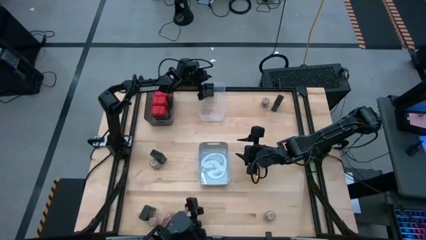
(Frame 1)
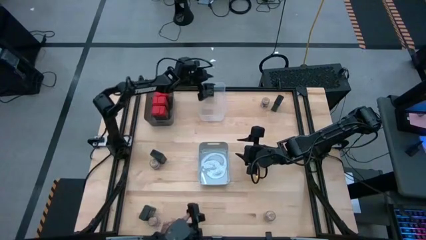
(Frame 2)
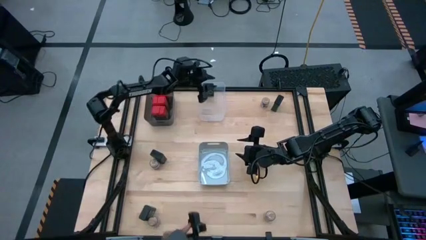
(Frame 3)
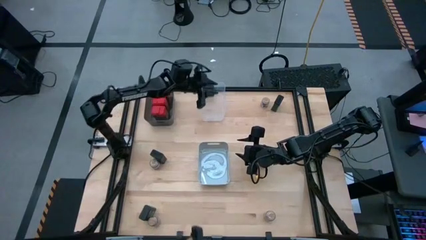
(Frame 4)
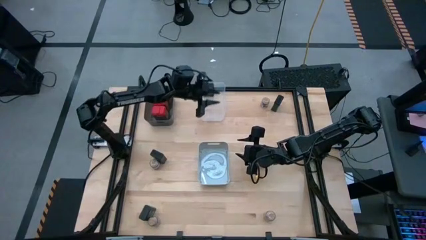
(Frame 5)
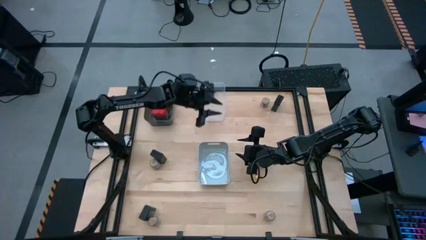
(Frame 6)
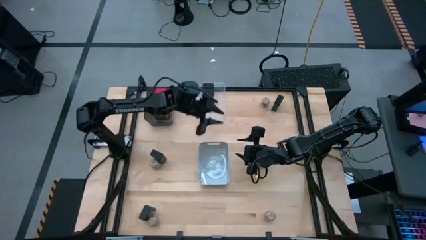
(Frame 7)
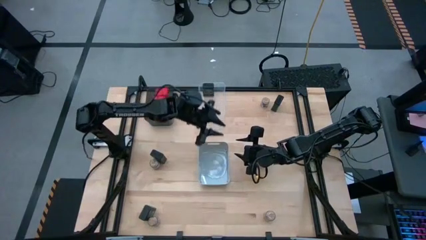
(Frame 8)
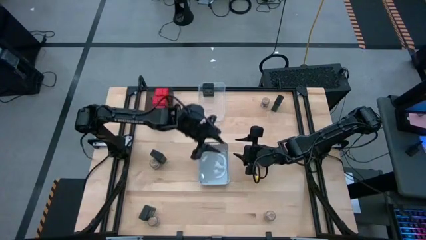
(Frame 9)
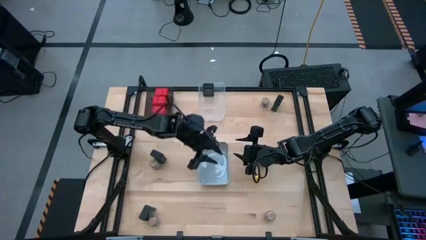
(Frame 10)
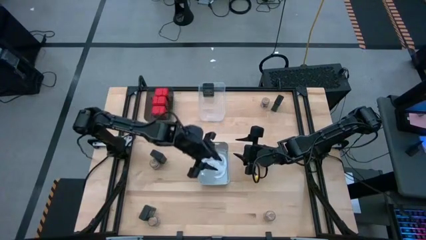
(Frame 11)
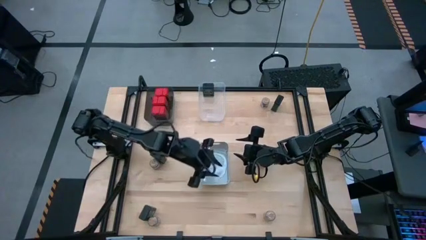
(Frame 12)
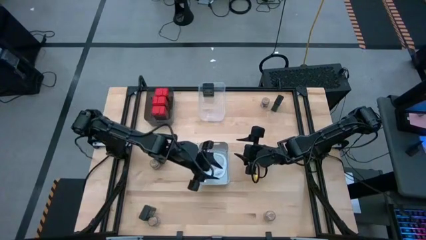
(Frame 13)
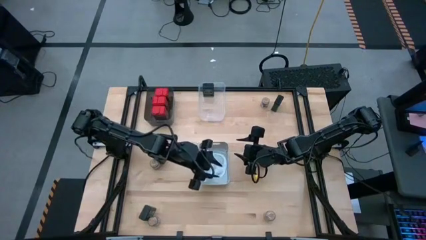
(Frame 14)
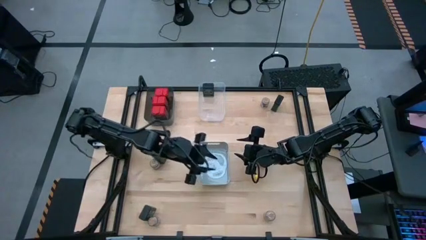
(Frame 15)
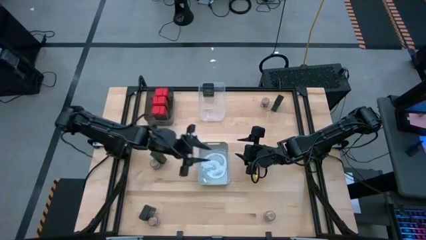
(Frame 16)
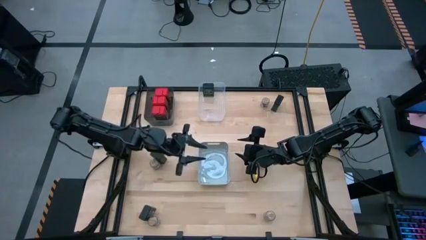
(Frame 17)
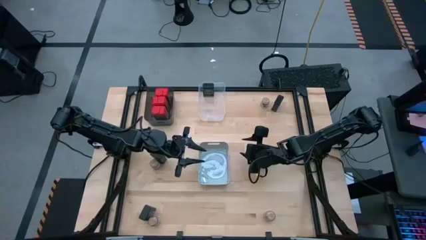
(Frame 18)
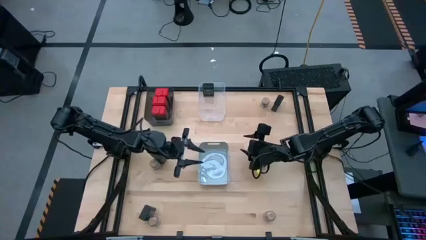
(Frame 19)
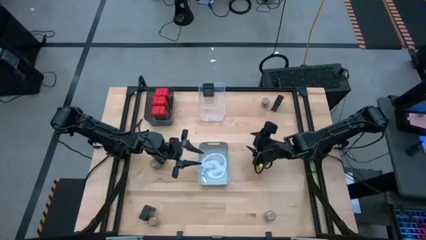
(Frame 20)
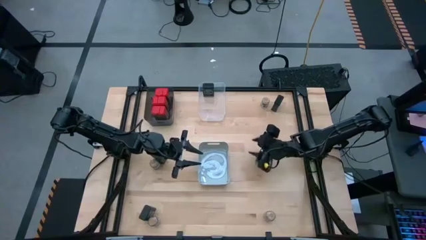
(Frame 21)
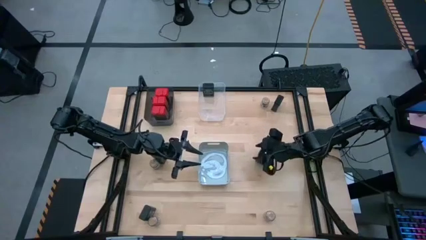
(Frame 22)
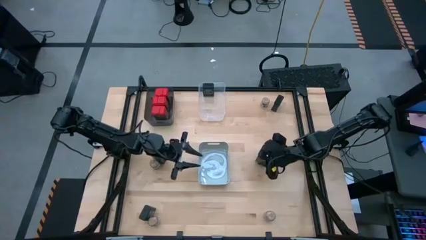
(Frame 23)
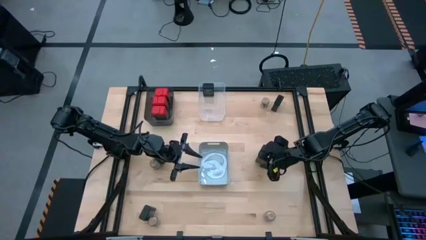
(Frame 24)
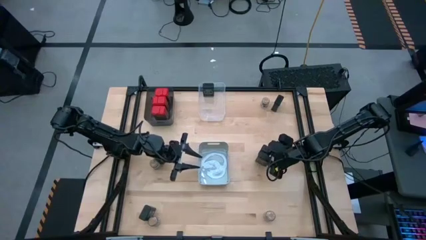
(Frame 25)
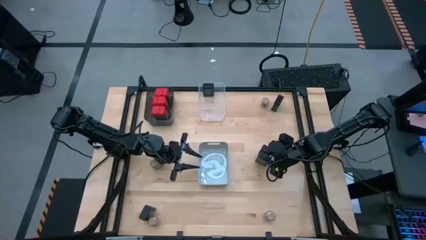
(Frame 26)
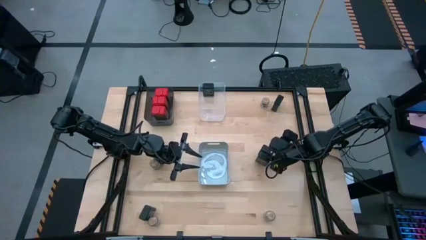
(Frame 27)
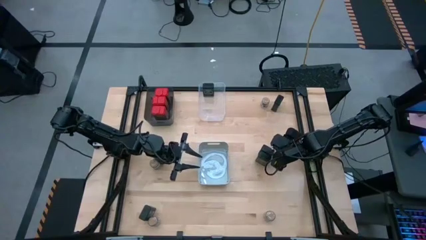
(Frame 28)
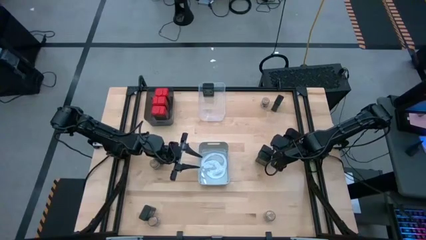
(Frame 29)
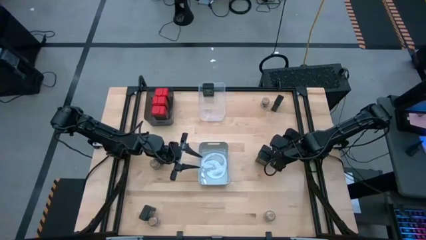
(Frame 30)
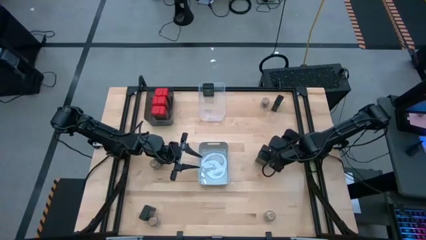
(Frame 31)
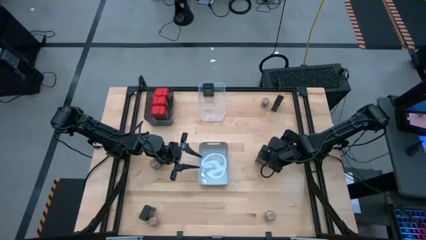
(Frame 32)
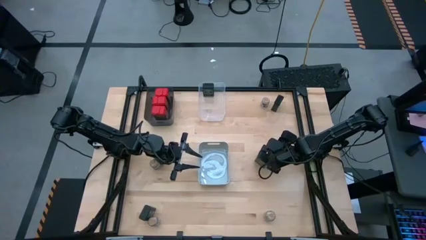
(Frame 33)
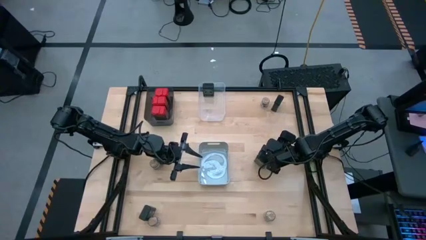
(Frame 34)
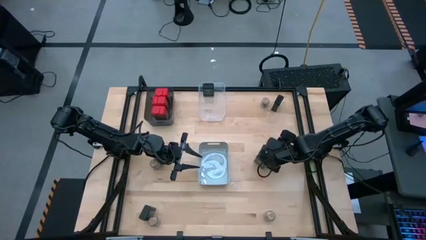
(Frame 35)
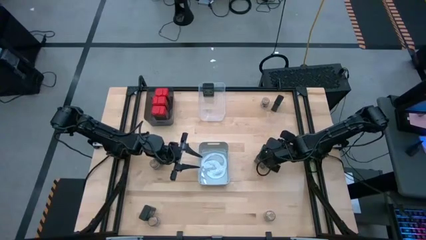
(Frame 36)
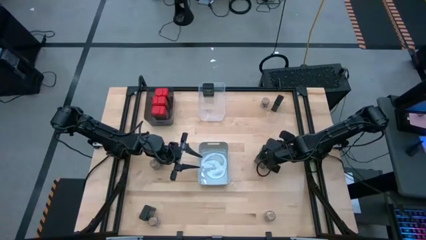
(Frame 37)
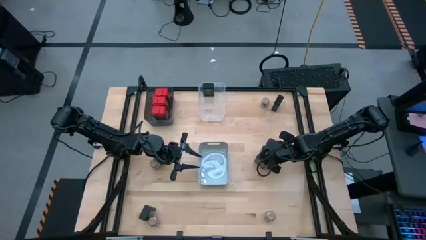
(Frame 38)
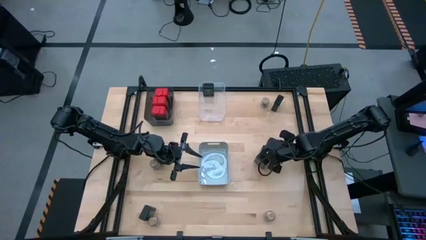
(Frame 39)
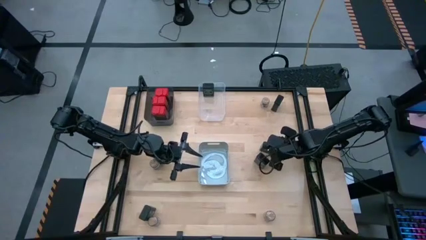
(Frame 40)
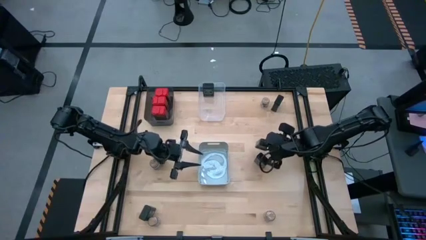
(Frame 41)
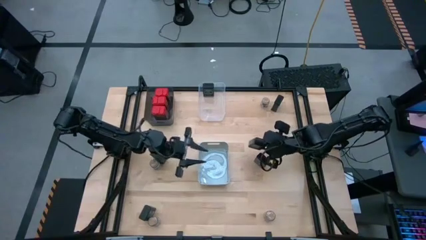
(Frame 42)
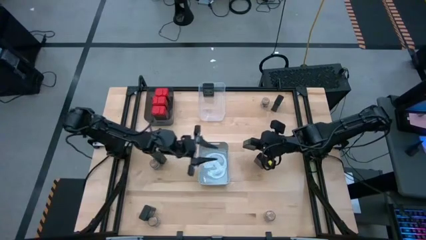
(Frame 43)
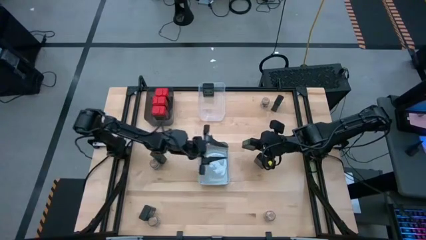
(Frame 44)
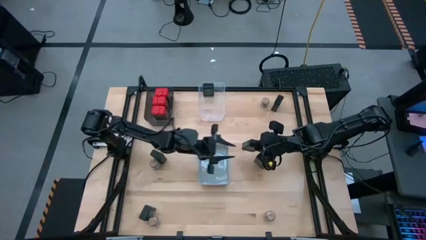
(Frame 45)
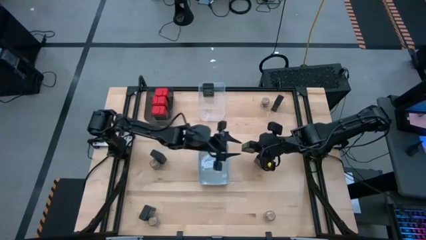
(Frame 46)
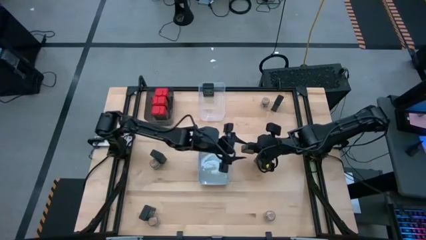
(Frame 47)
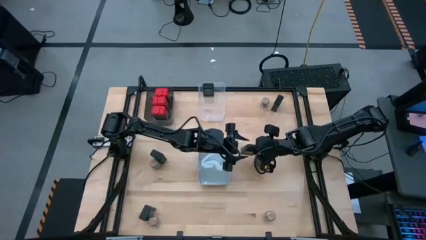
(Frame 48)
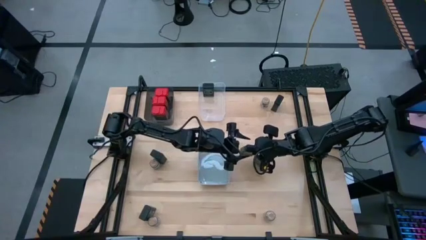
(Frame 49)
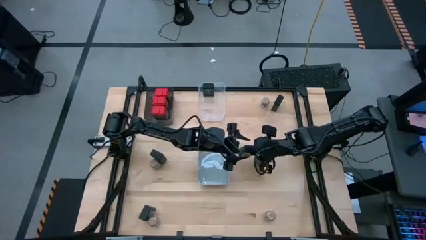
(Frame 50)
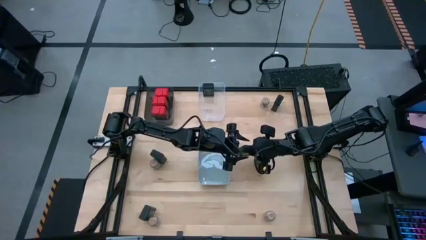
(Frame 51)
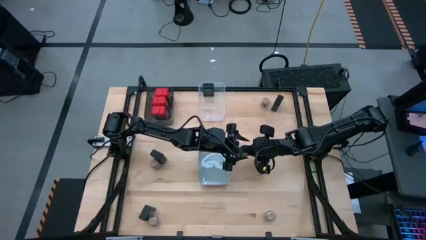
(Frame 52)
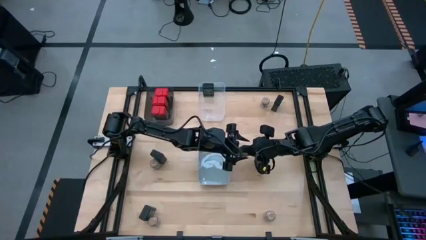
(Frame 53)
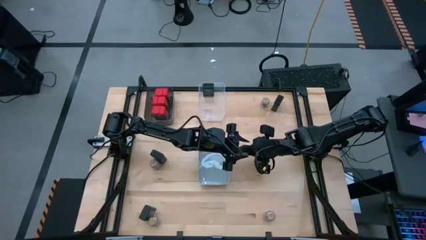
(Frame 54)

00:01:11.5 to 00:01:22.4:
Task: Sort spices by type
Put the black seasoning can into the transparent bin

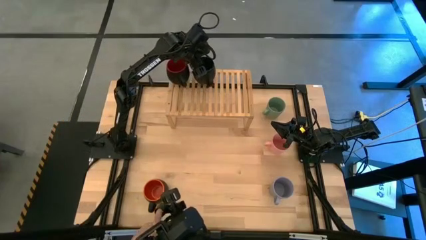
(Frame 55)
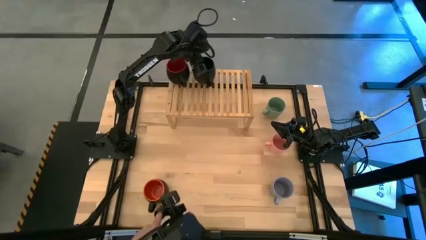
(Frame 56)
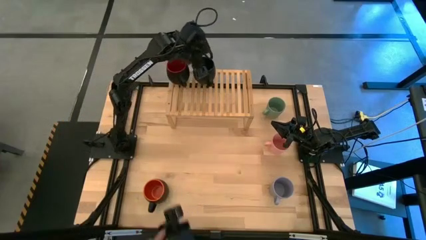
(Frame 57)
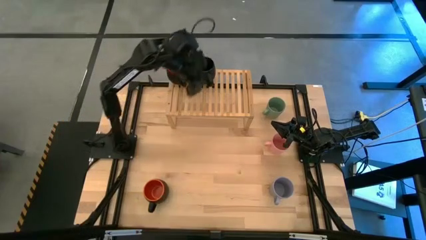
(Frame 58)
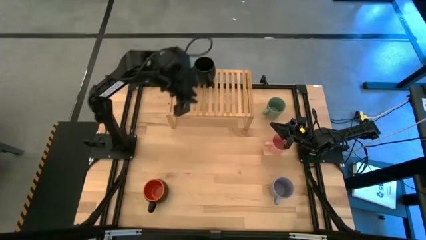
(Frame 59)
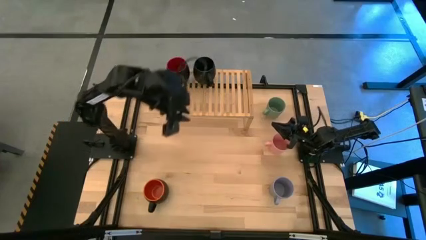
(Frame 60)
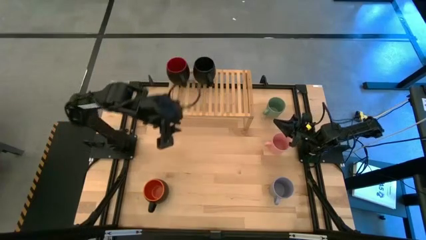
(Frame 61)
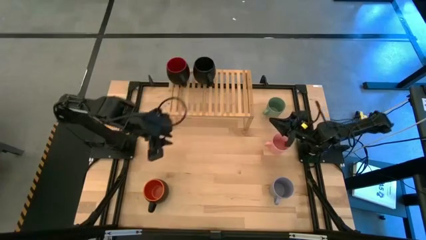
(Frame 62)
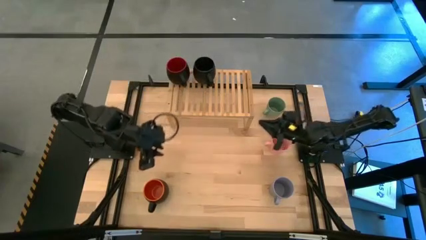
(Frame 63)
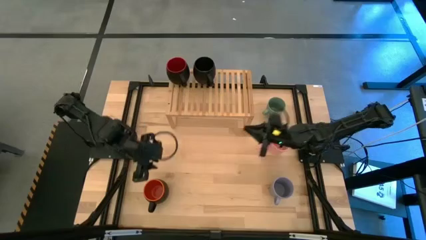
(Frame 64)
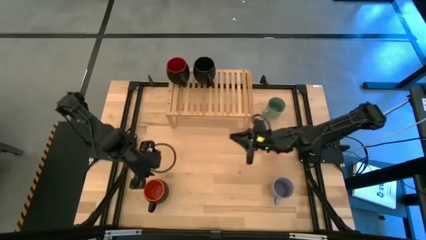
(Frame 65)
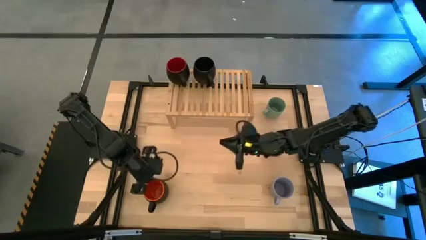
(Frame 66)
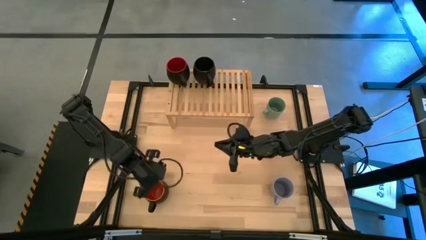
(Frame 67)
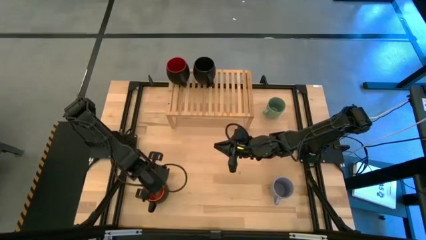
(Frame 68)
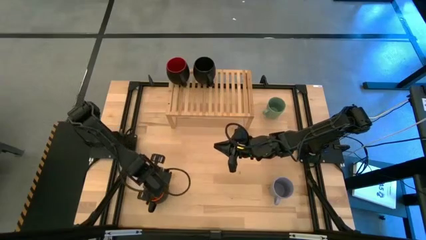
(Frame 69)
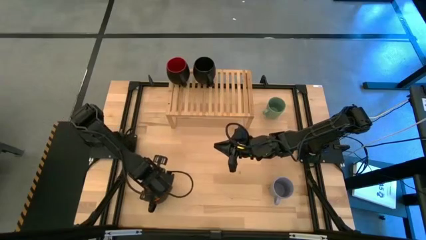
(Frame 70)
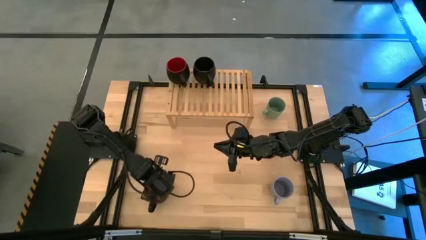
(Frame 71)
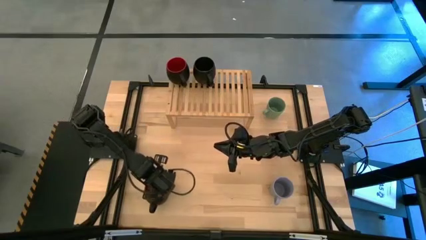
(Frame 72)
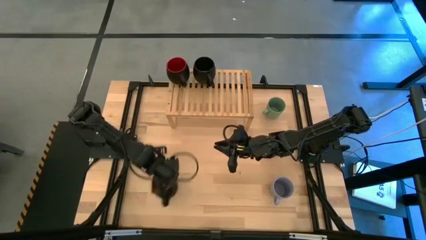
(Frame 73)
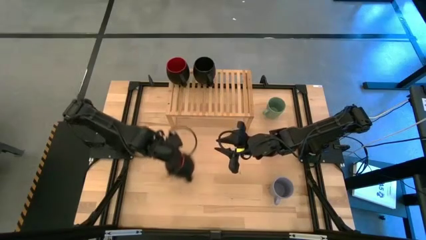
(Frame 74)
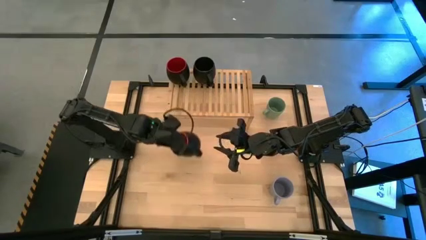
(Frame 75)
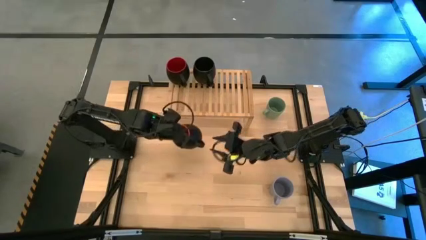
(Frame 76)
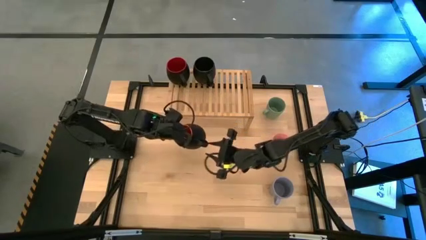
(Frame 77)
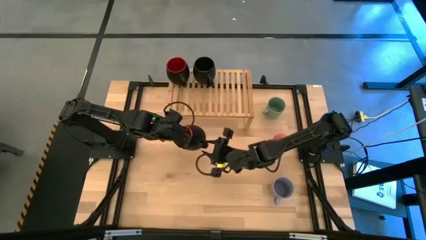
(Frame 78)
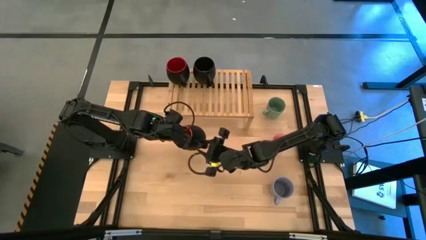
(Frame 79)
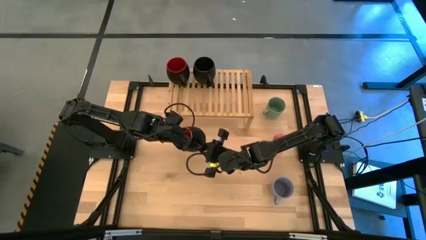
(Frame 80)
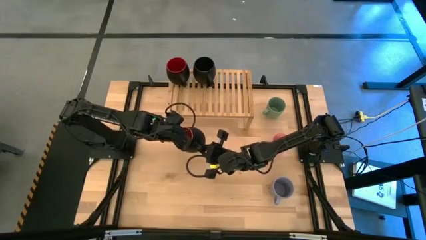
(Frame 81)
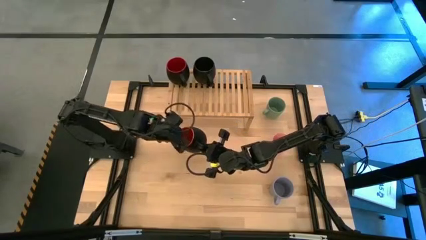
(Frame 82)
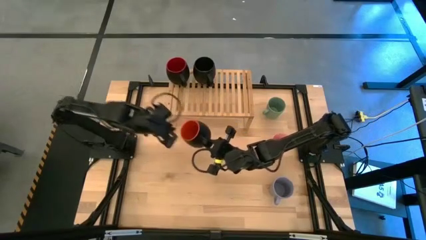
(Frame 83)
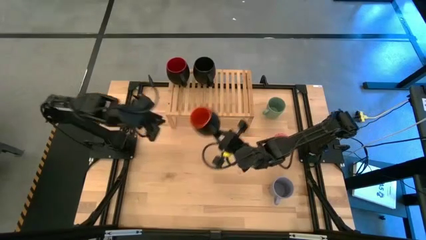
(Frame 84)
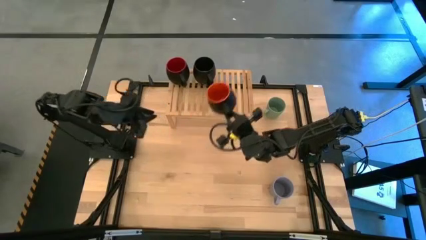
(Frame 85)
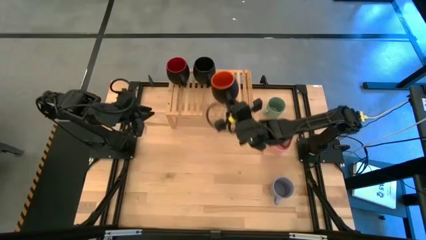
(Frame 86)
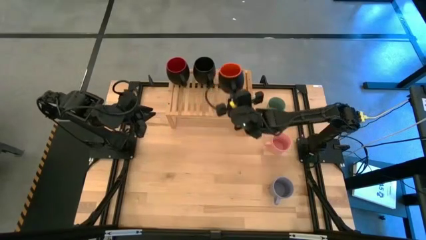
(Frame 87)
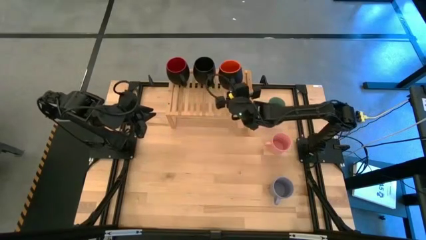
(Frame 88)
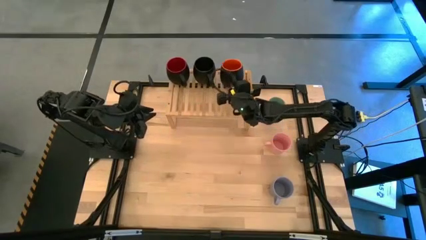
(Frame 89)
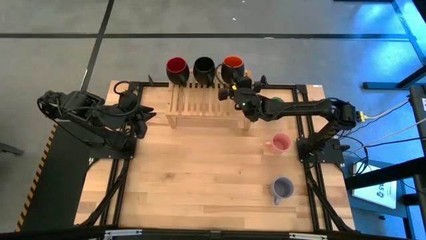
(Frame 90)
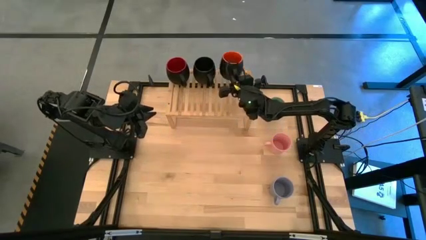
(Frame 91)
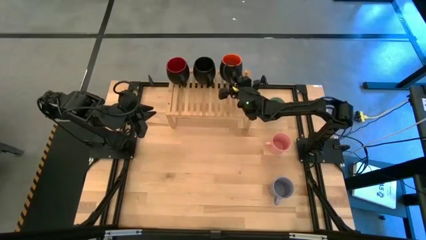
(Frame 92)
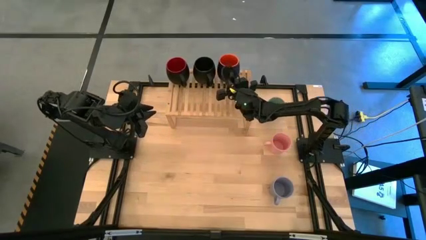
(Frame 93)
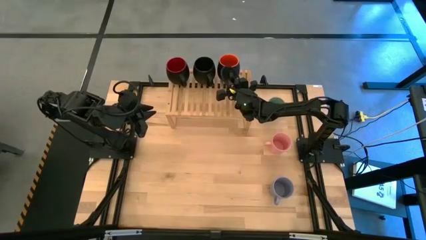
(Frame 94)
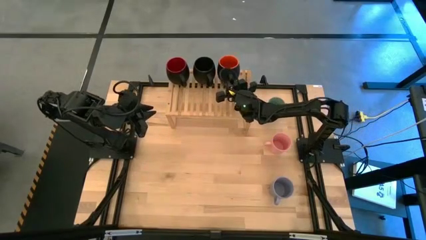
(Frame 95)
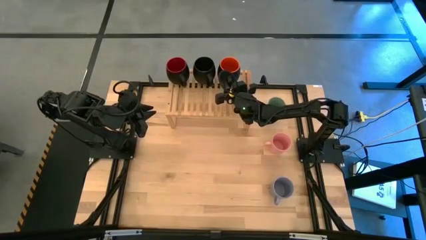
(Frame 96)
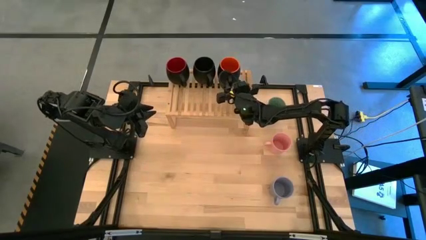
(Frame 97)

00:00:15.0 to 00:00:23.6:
Task: Place coffee mugs
Put the orange mug on the shelf
